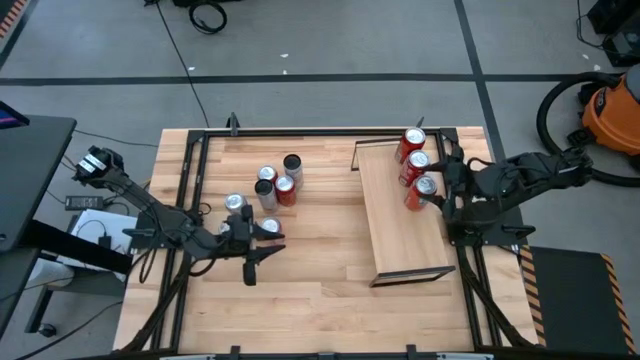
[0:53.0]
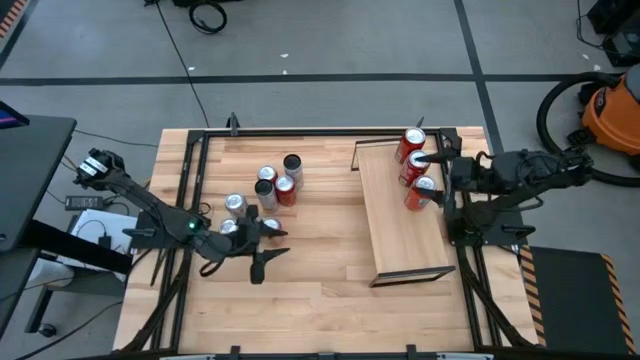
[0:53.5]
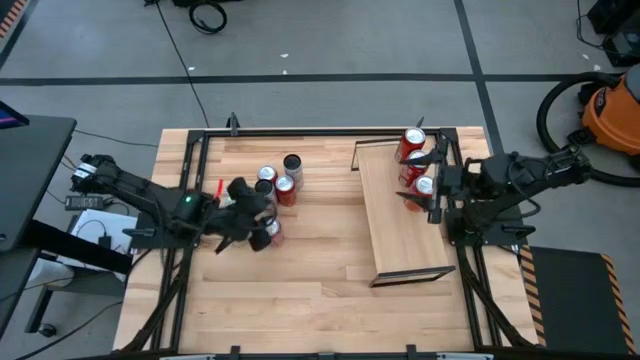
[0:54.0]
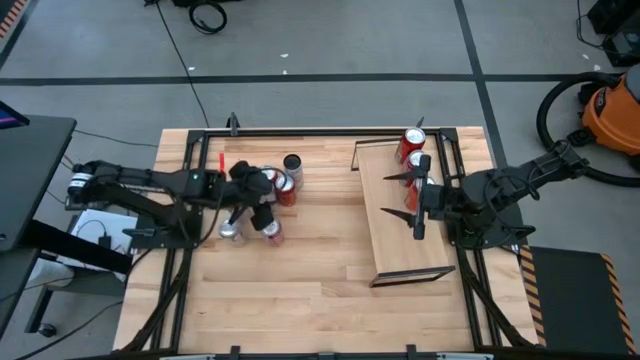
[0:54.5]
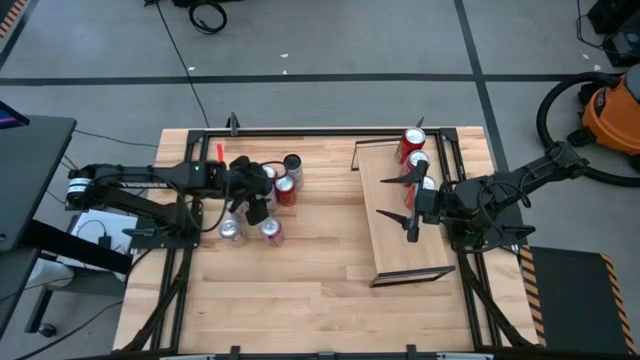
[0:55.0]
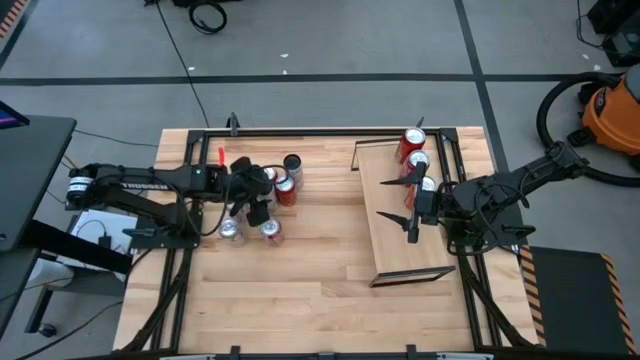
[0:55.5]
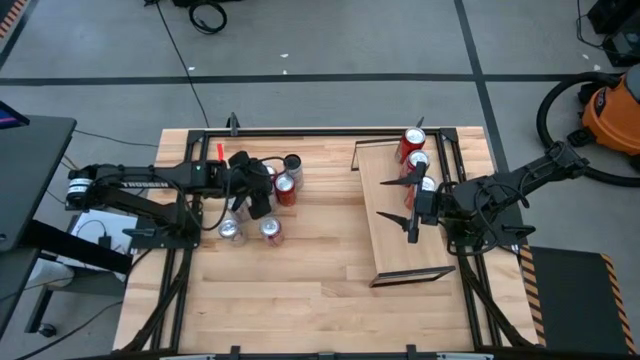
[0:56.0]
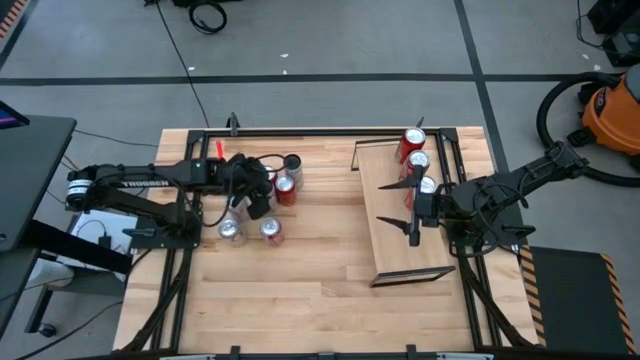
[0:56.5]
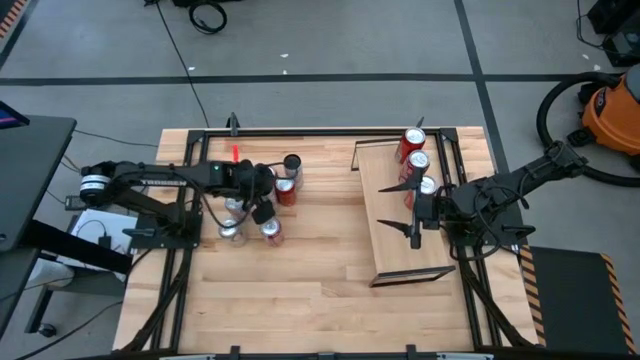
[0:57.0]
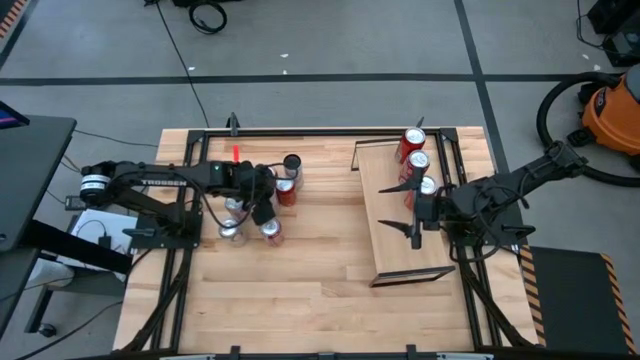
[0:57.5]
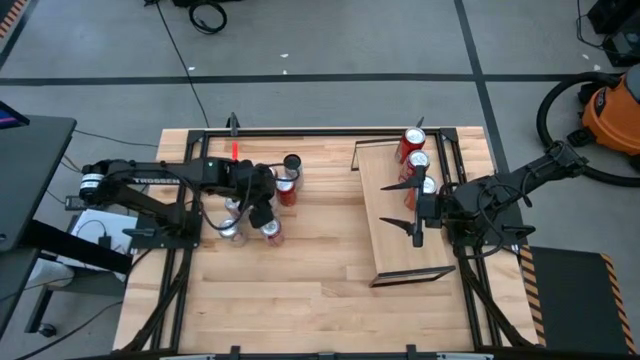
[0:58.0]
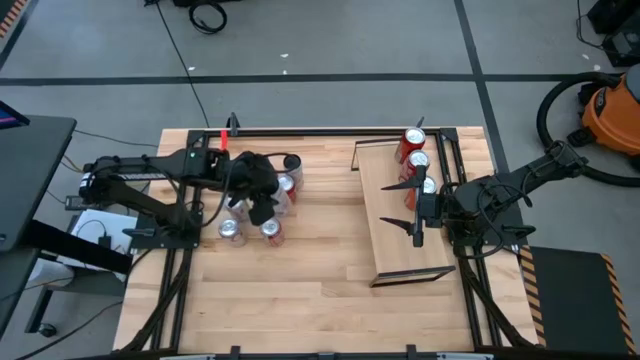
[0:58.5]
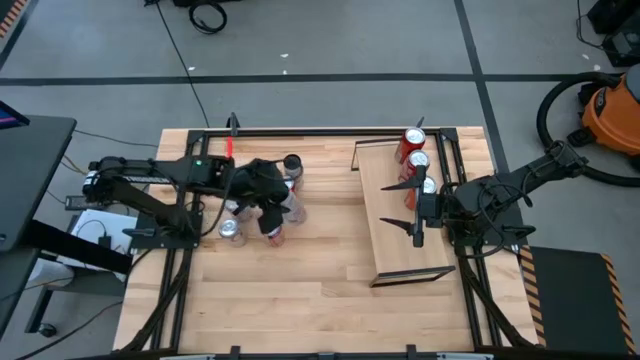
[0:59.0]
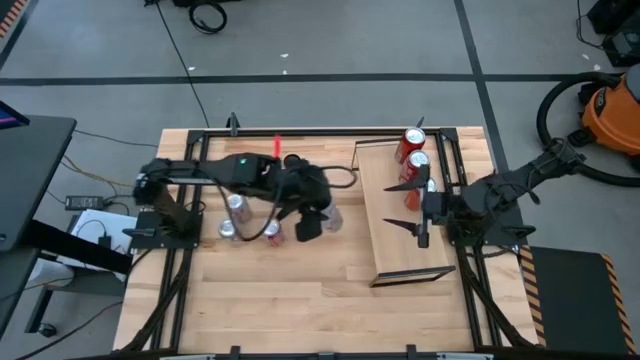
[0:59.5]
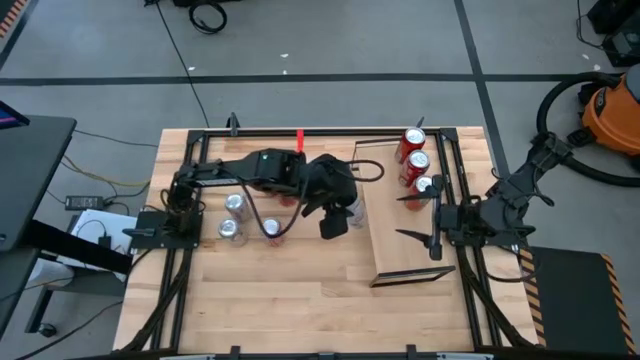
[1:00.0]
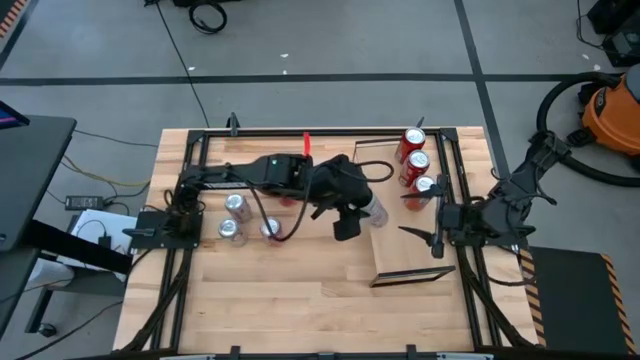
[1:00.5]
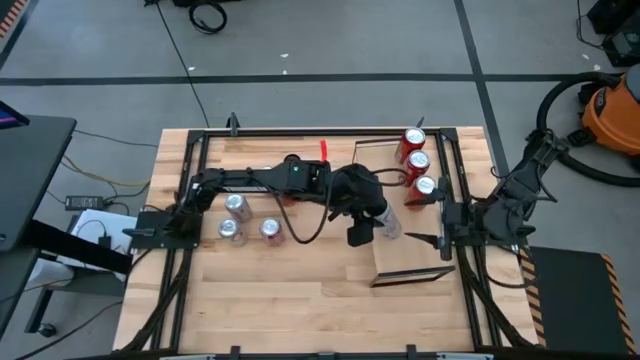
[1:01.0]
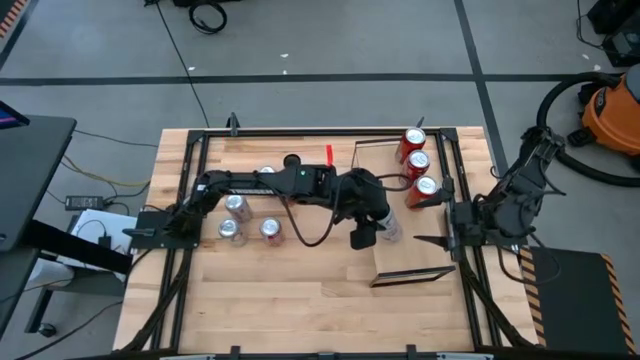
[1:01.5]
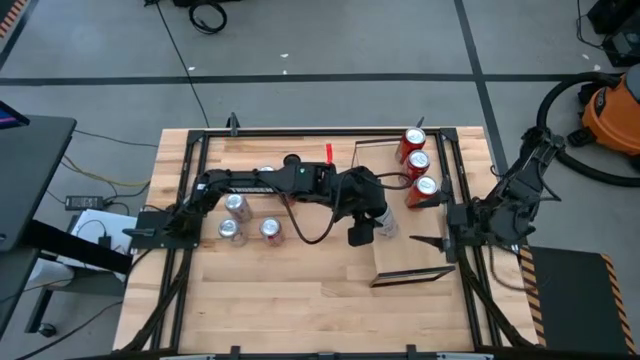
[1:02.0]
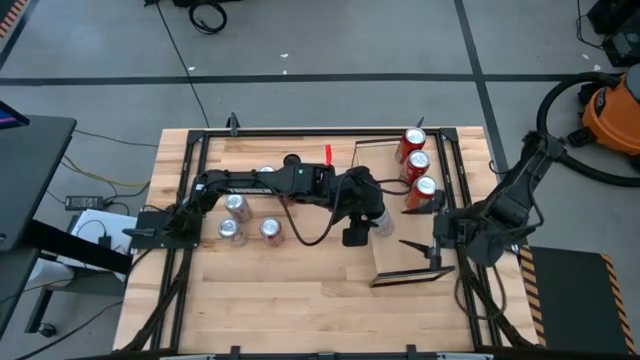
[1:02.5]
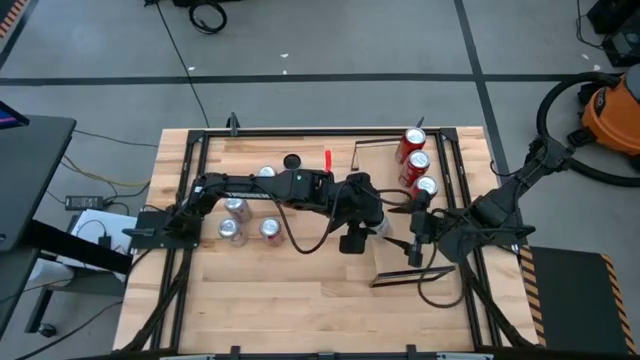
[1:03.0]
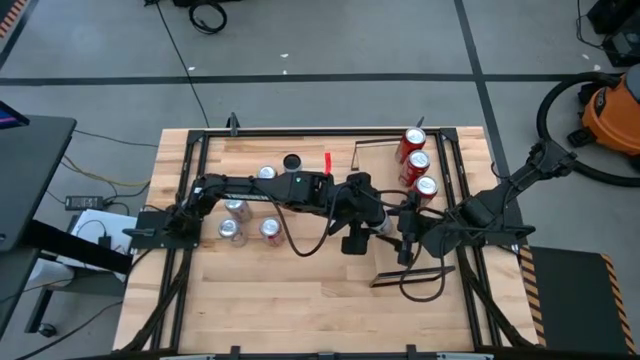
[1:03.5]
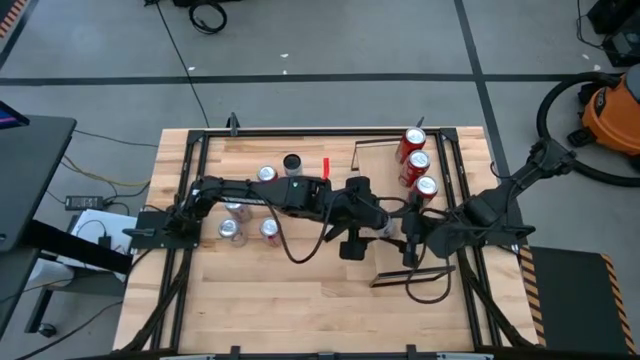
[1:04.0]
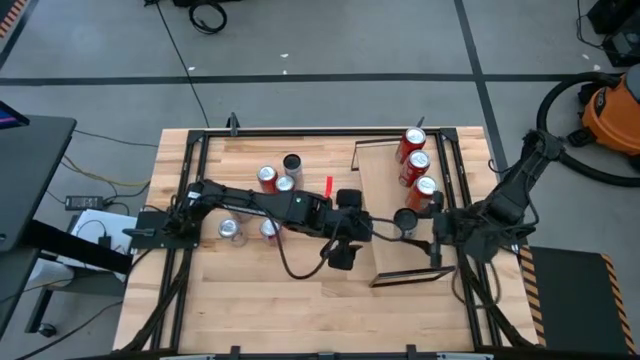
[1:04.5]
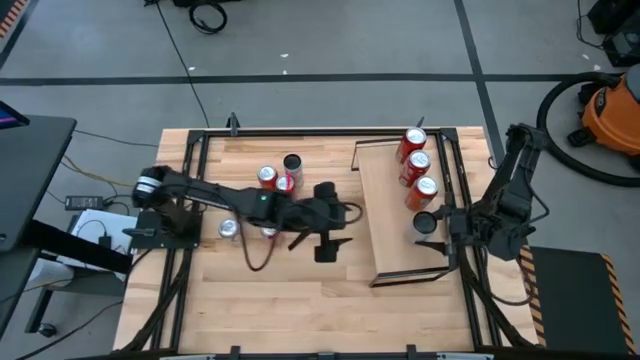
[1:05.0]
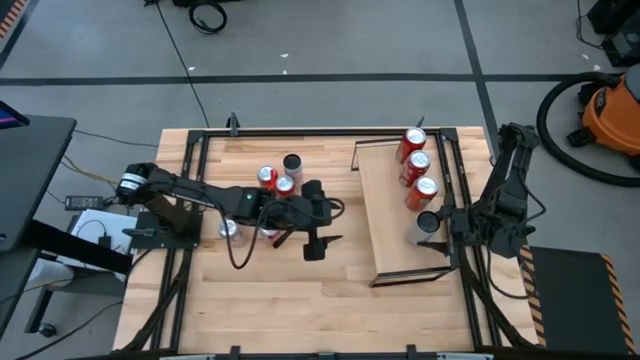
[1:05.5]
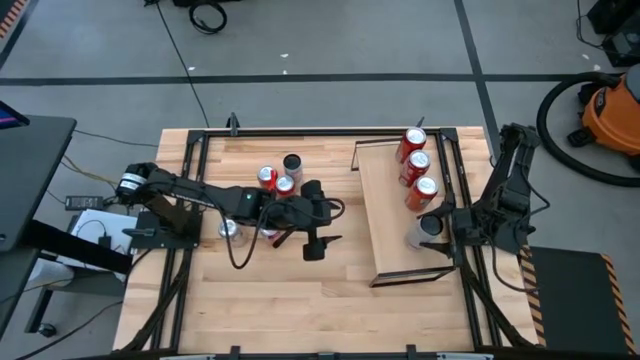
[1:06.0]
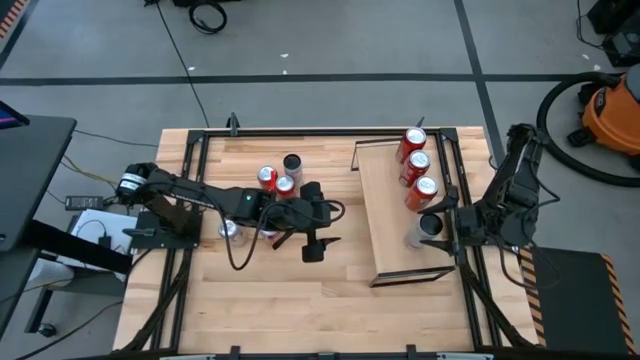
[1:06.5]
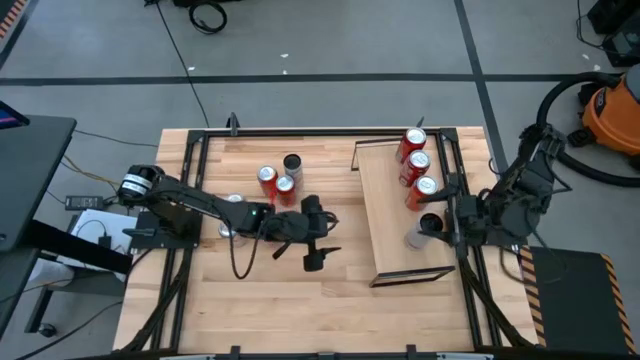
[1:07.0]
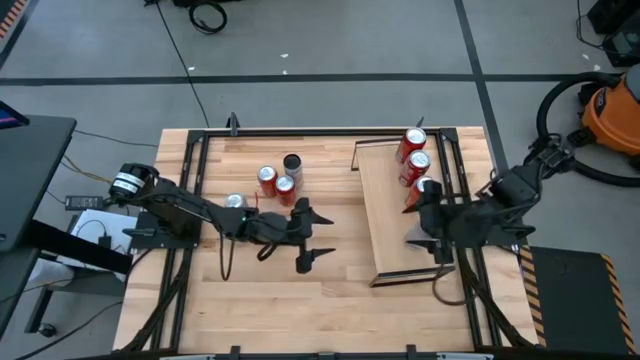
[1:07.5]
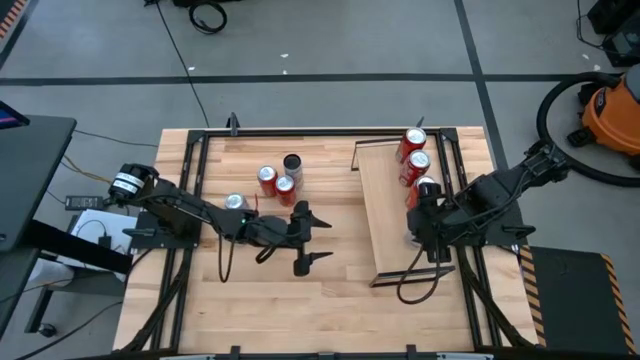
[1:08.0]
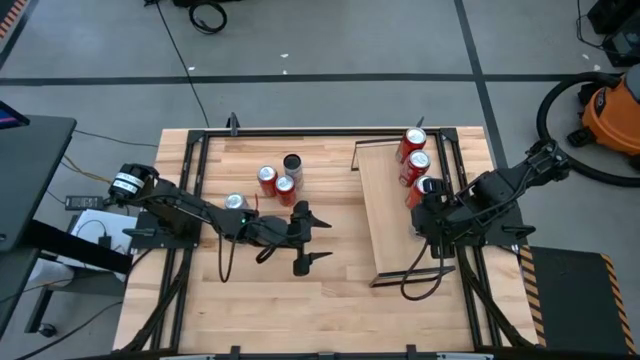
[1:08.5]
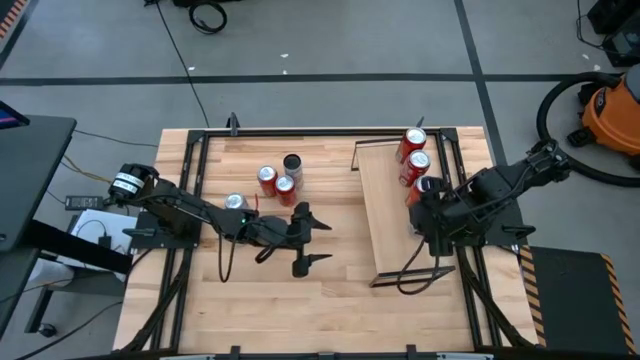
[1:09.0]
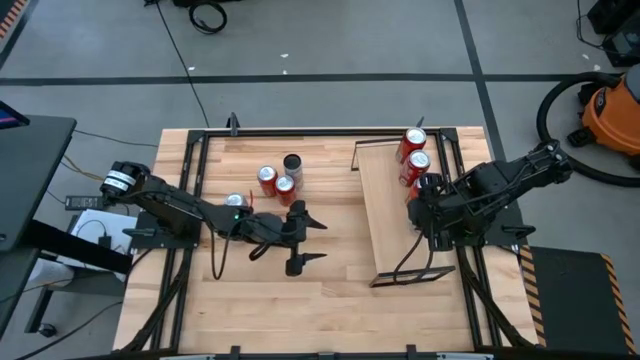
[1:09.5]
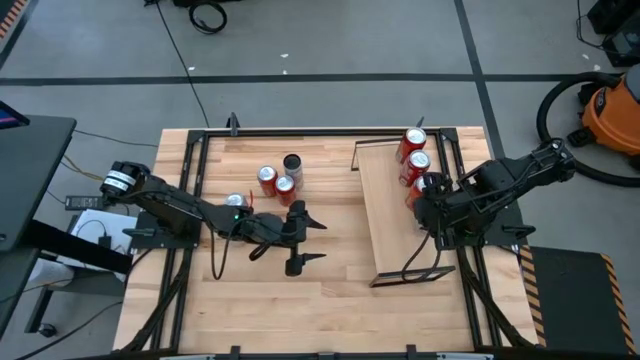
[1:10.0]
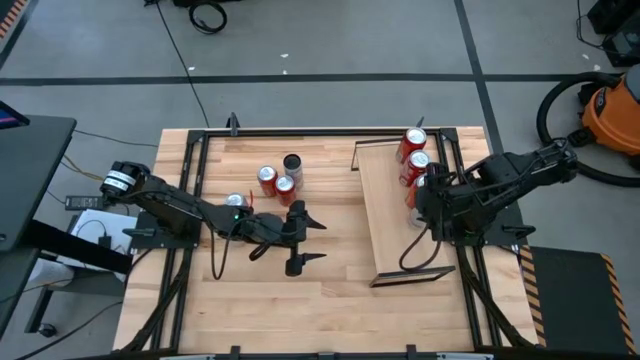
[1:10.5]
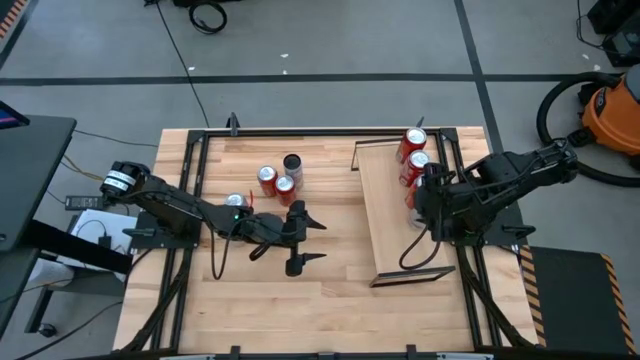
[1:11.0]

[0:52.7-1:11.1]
Task: Place canned beverage on shelf
Put the bottom white pink soda can on the shelf

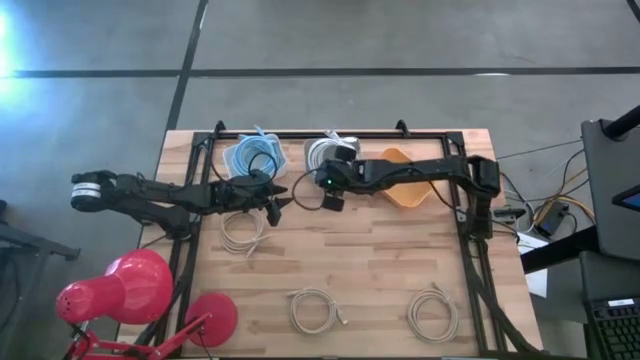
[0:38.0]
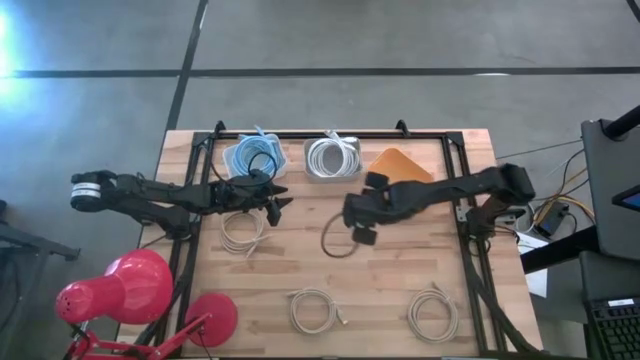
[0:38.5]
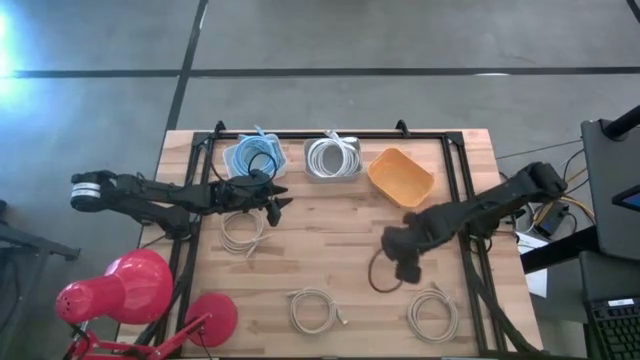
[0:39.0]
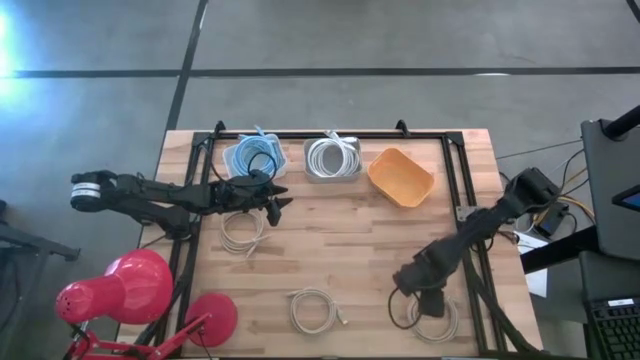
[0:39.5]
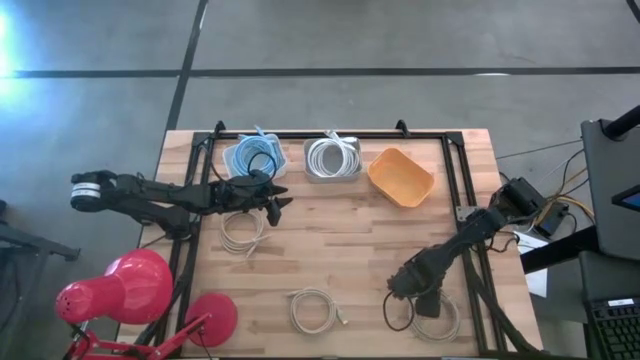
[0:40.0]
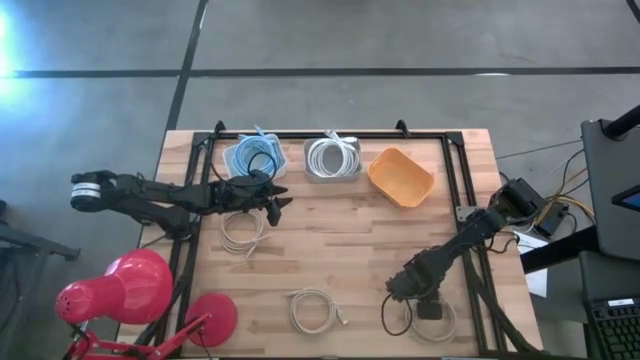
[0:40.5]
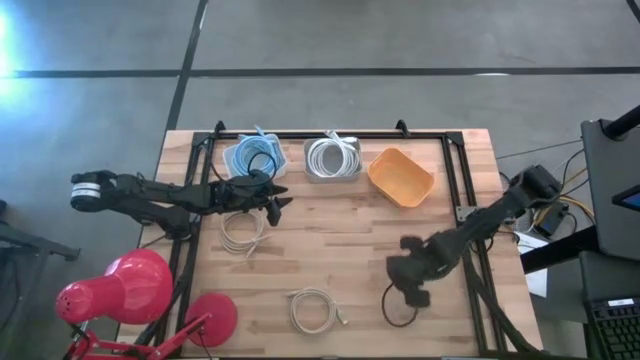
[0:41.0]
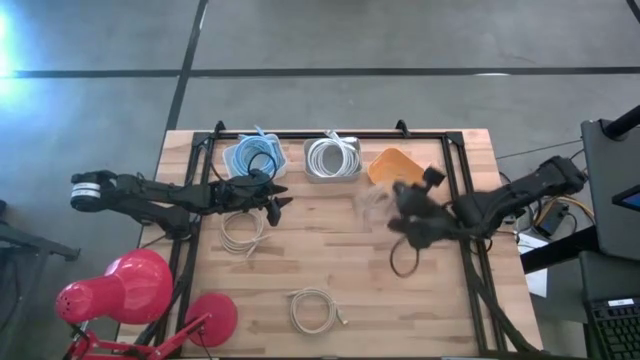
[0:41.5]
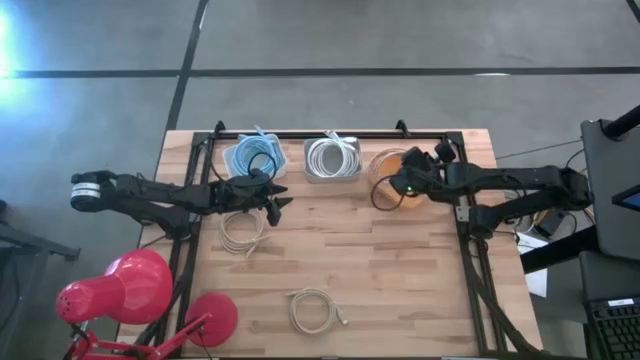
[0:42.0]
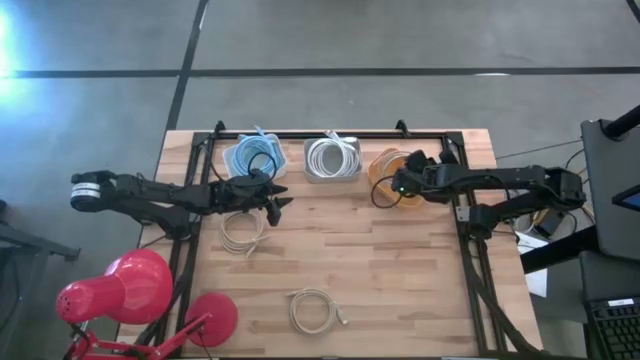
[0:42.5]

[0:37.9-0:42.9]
Task: Pick & Place USB Port
Put the bottom right brown cable into the yellow bin
